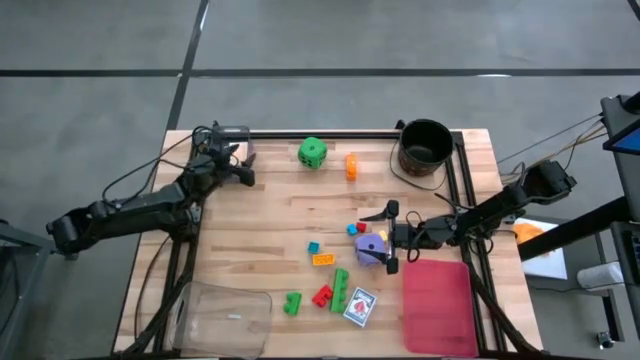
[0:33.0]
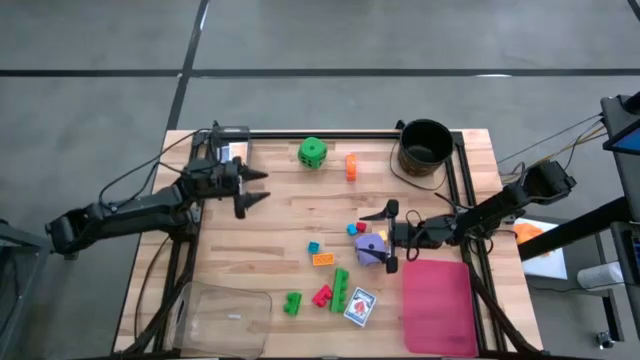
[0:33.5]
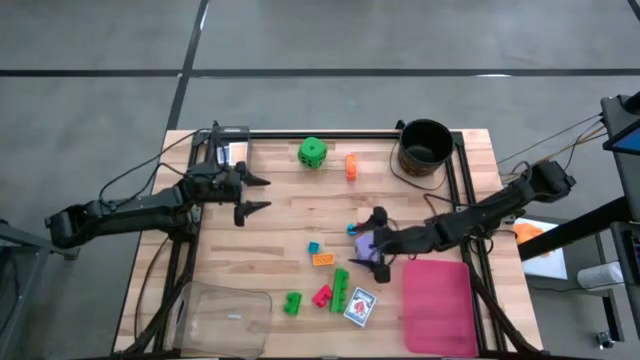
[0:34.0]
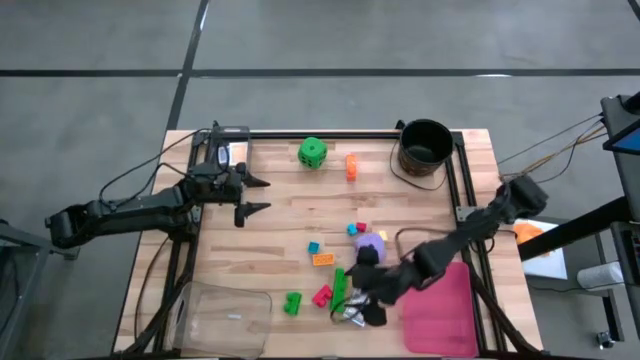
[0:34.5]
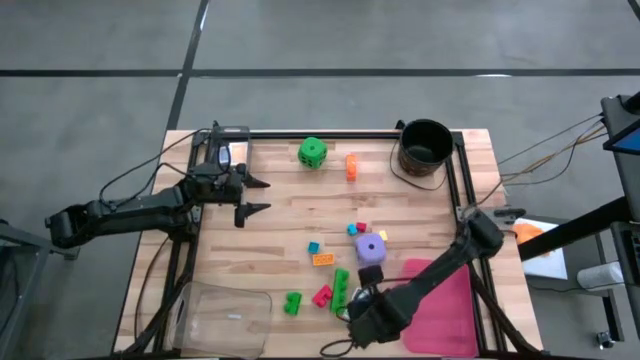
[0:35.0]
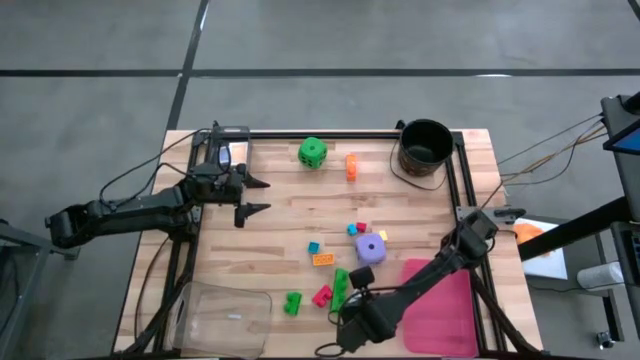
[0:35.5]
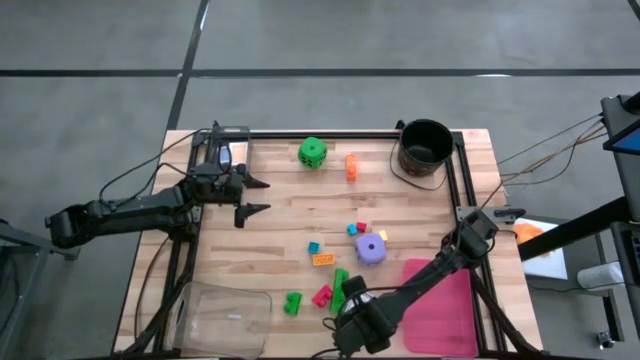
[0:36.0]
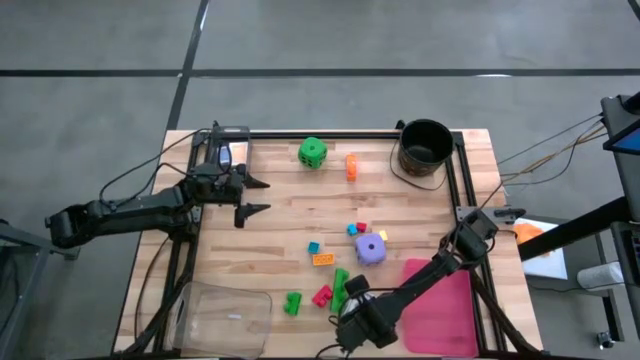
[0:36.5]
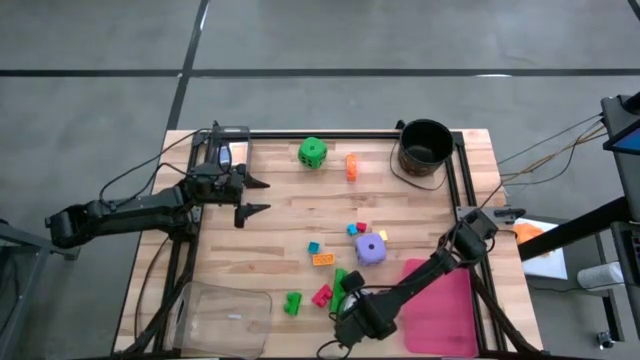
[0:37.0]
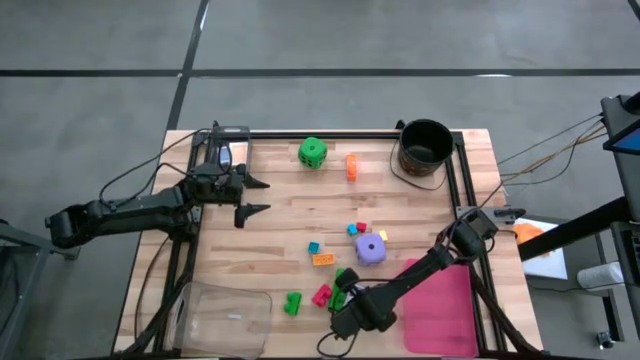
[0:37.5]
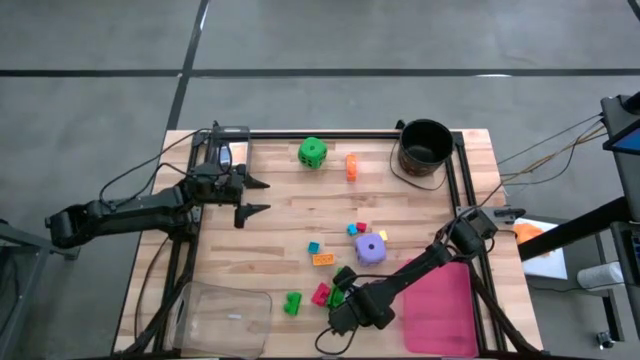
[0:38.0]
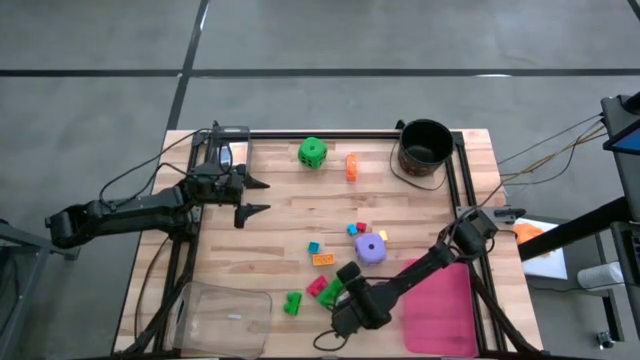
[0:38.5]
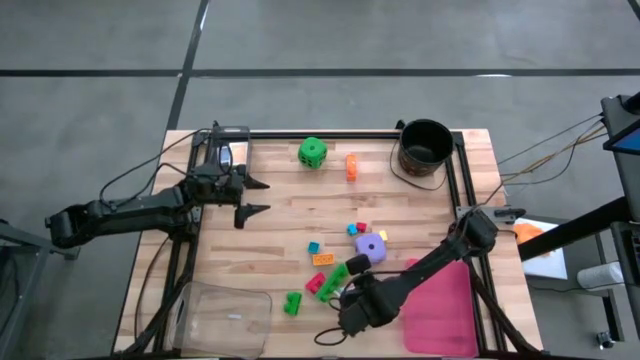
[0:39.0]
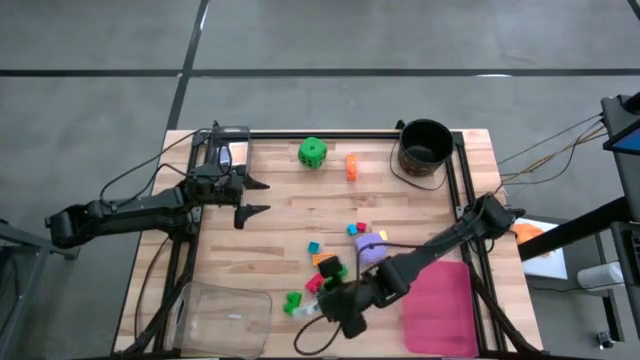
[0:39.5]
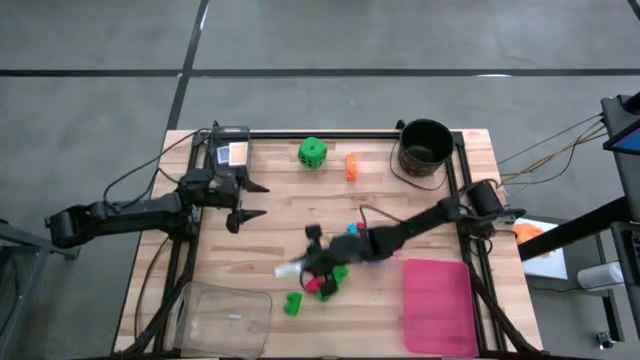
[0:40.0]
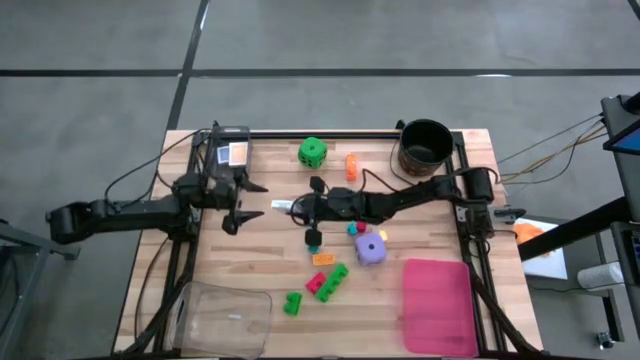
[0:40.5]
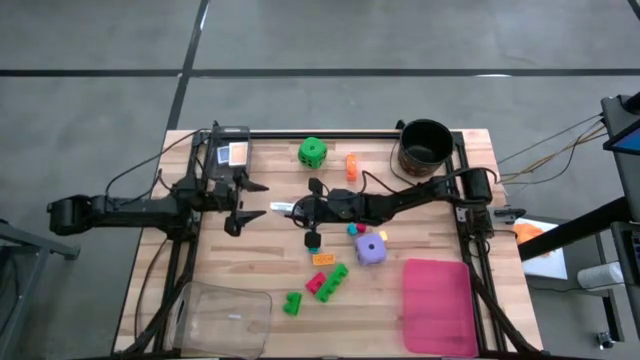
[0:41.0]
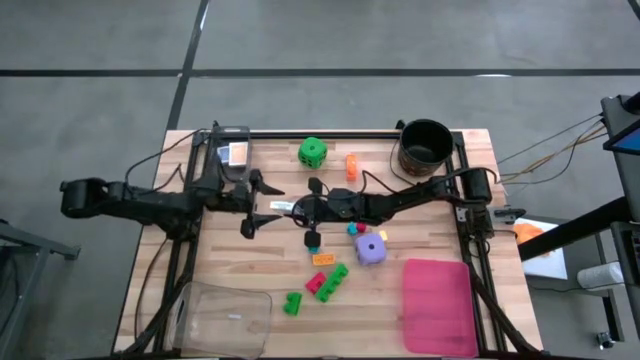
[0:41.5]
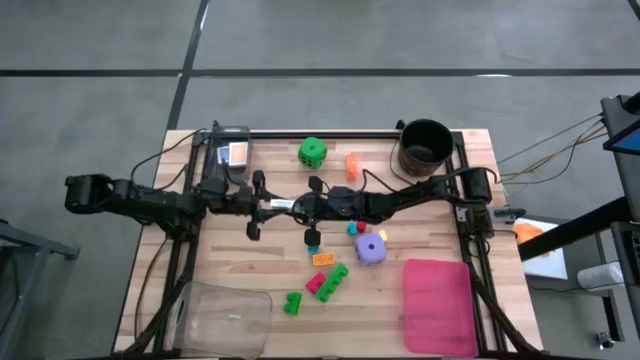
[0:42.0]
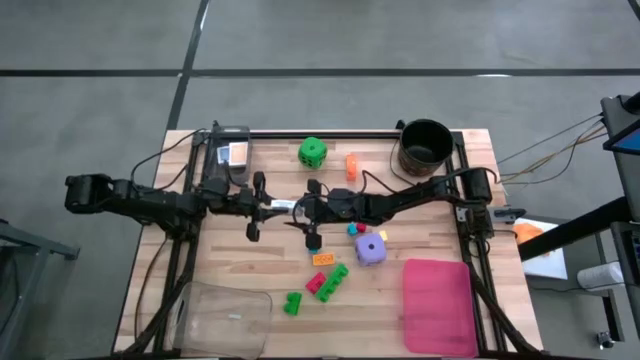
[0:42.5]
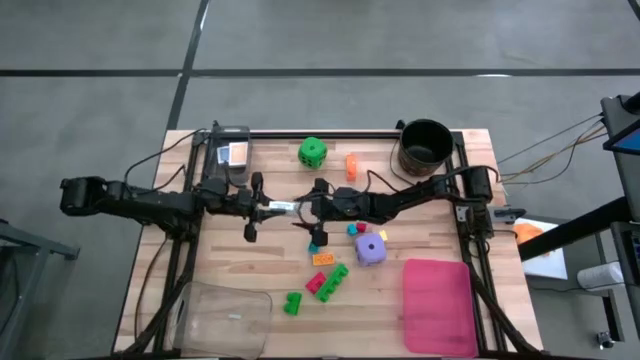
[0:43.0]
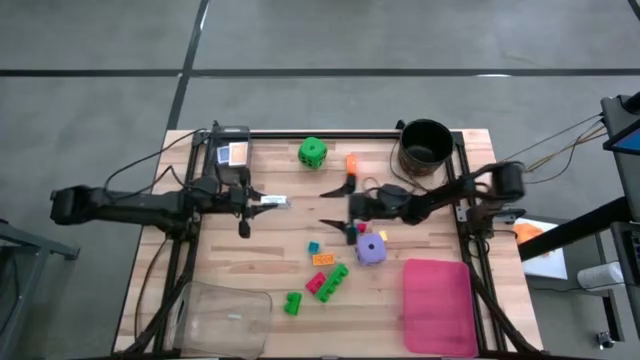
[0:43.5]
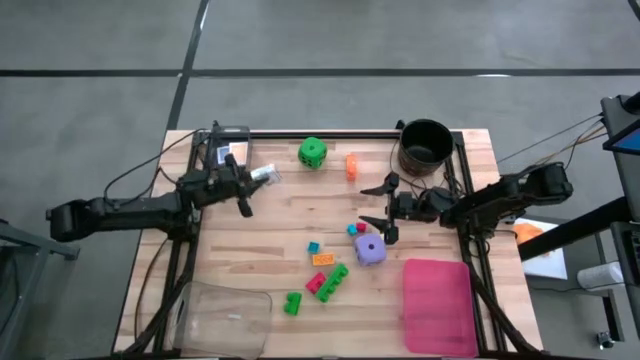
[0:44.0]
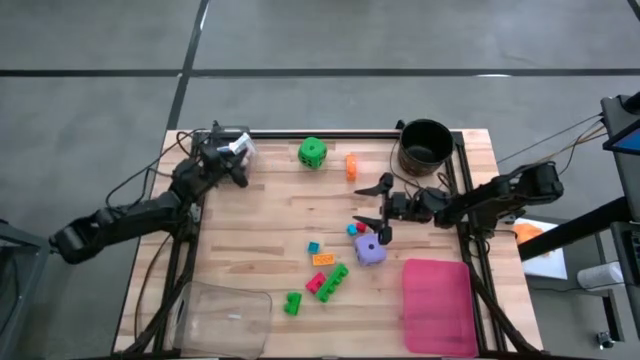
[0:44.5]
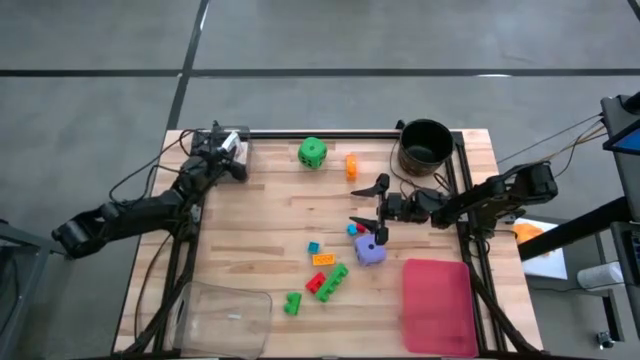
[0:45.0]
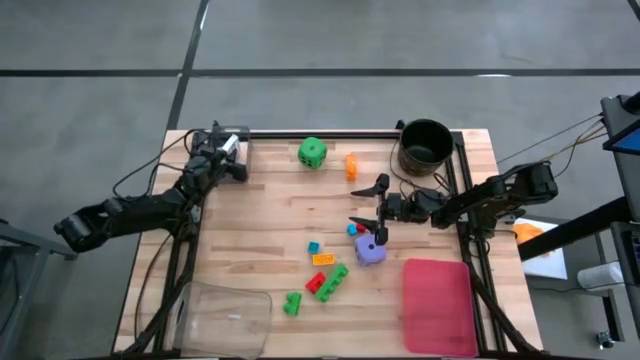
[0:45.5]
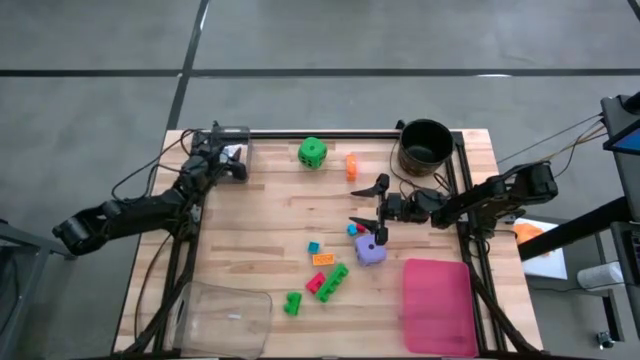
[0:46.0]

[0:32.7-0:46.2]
Task: Pick & Place Toys
Put the white deck of cards into the black bin

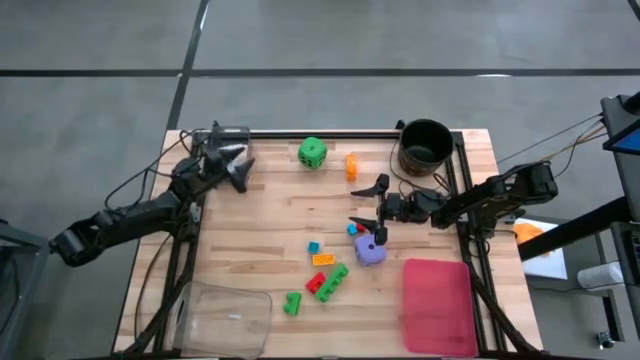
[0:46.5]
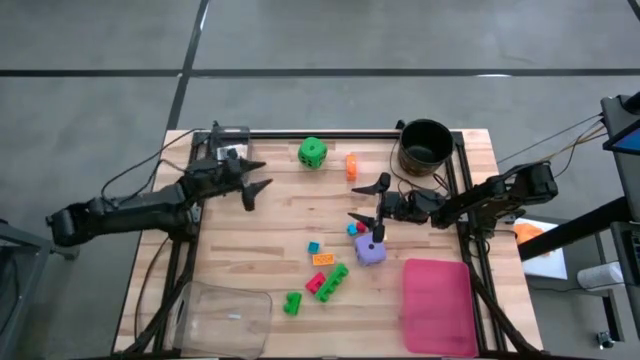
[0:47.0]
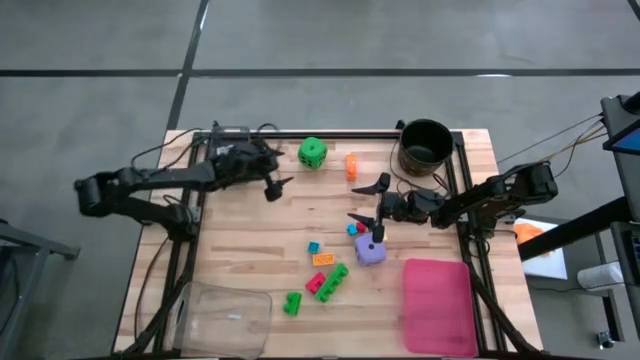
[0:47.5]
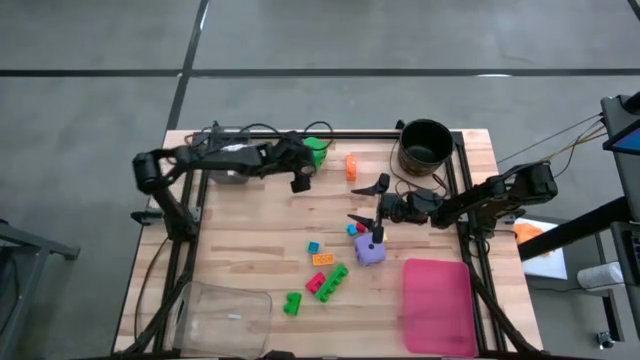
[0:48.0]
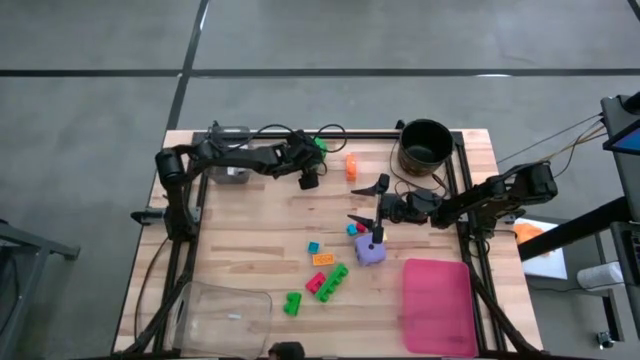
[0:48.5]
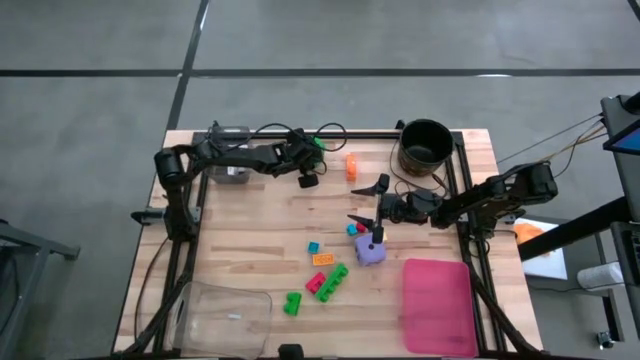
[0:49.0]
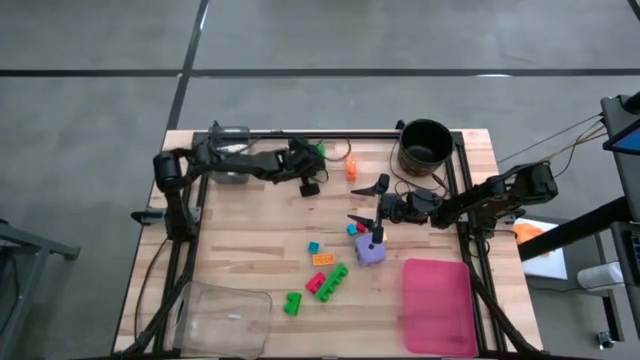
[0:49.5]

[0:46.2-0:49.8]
Put the green die into the transparent bin

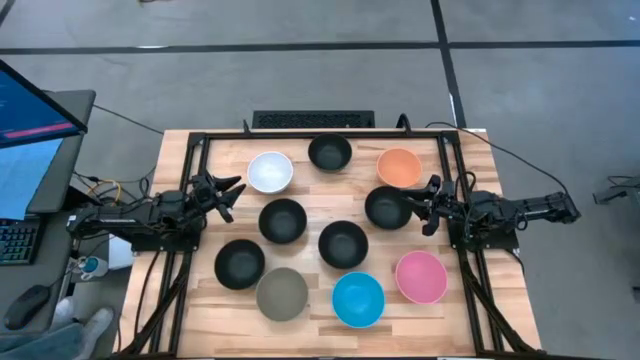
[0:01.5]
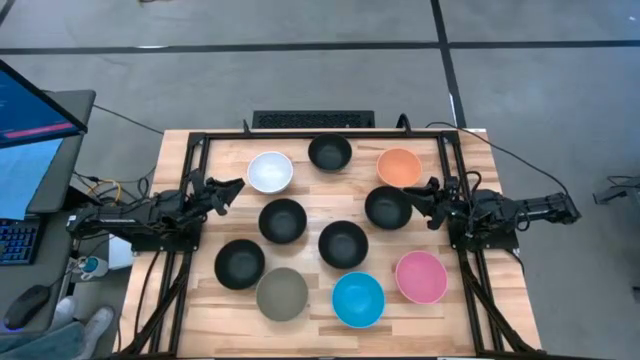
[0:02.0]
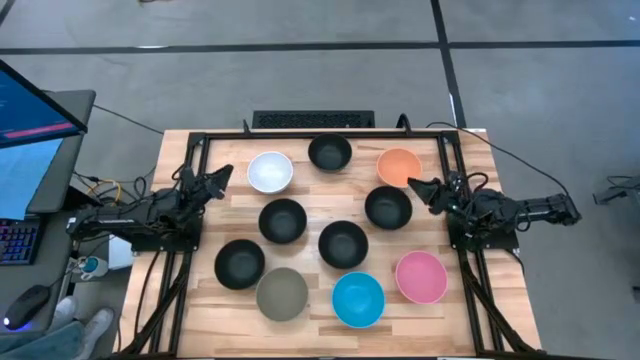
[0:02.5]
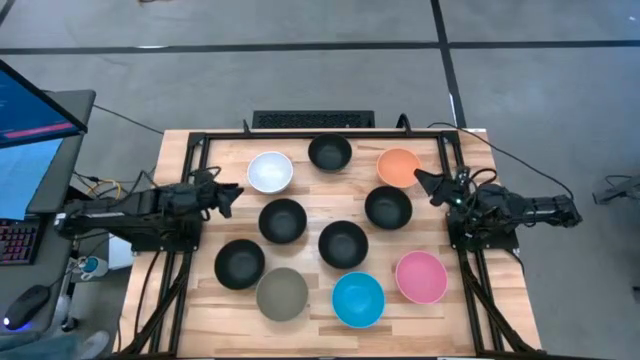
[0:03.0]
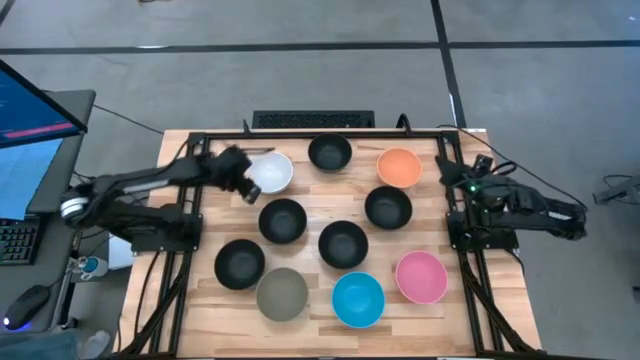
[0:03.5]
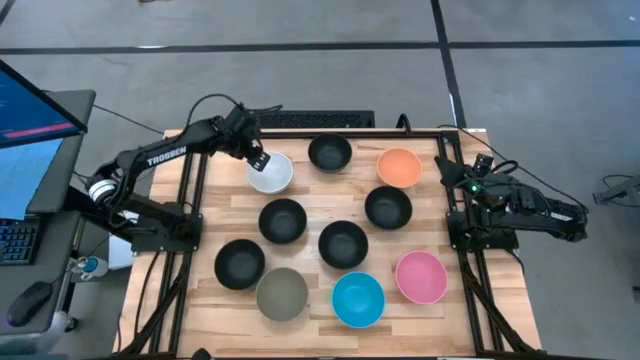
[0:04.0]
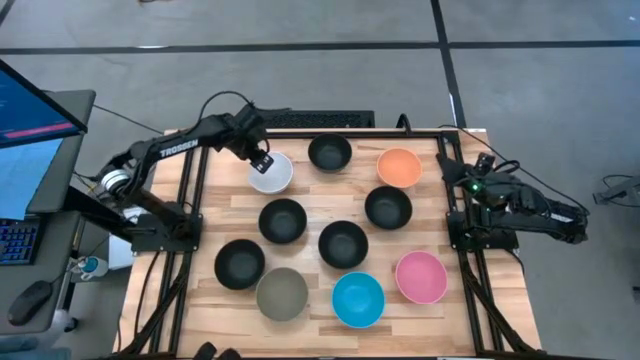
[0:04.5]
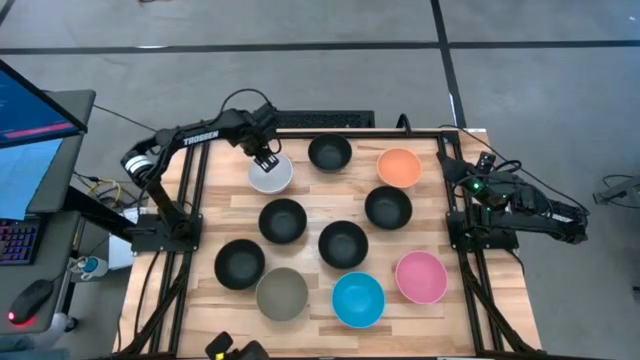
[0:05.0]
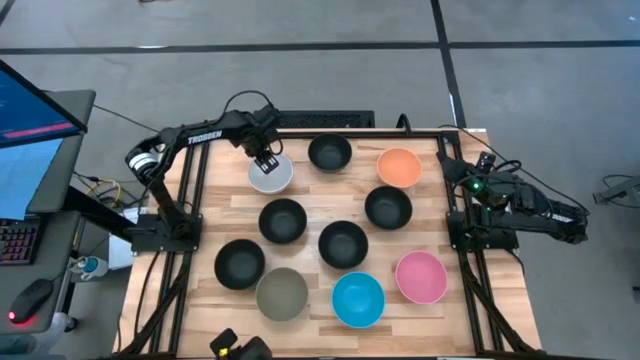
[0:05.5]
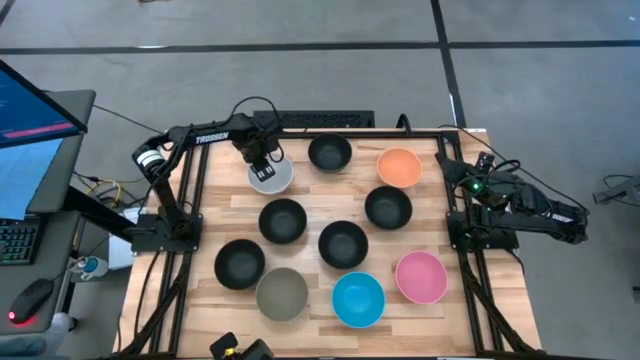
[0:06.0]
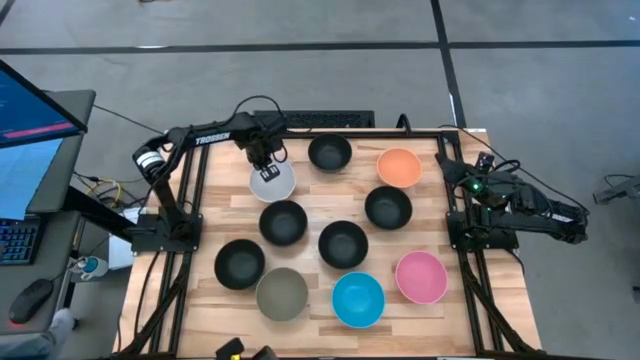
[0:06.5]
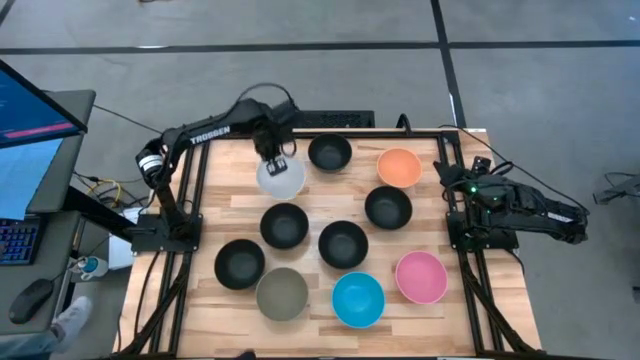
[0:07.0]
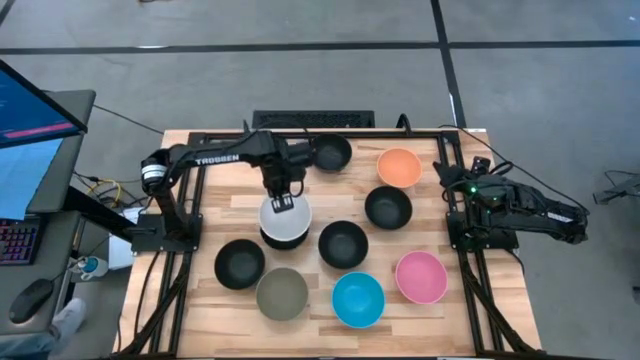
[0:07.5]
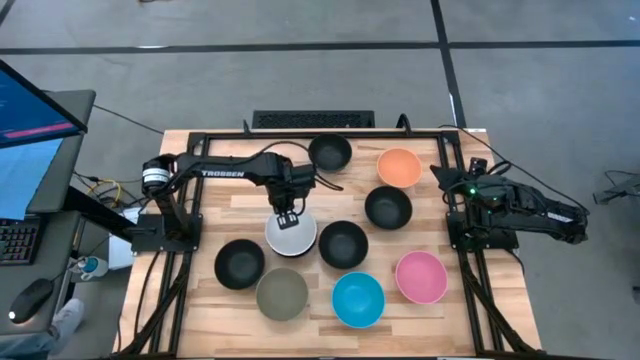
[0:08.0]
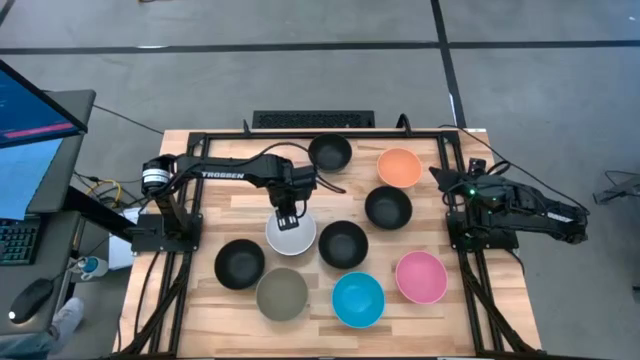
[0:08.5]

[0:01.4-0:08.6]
Task: Nest bowls inside each other
Stack the white bowl on top of the black bowl
